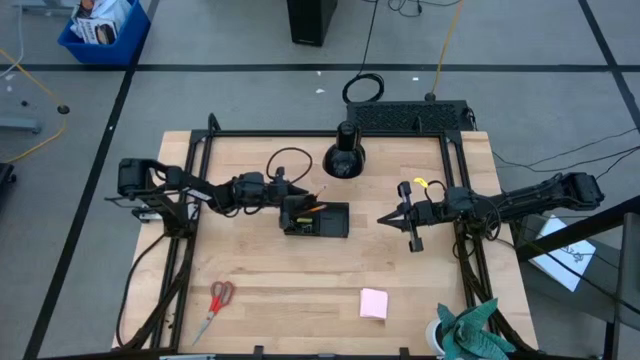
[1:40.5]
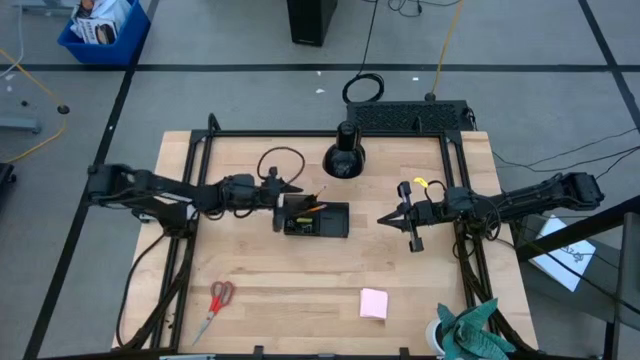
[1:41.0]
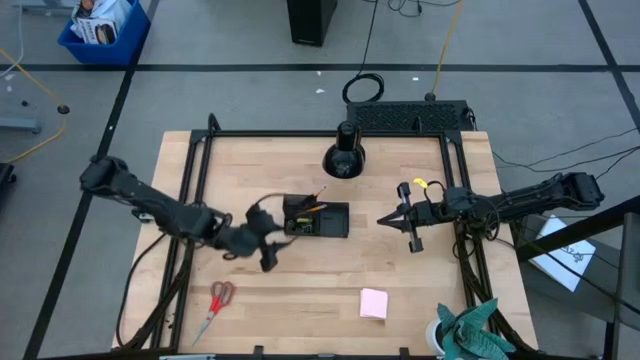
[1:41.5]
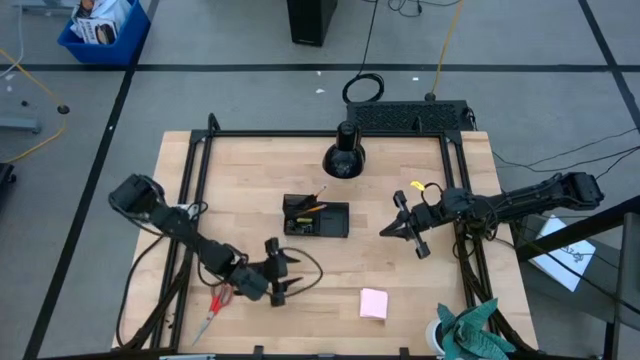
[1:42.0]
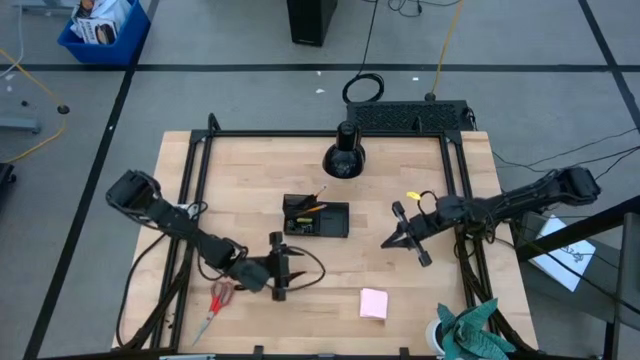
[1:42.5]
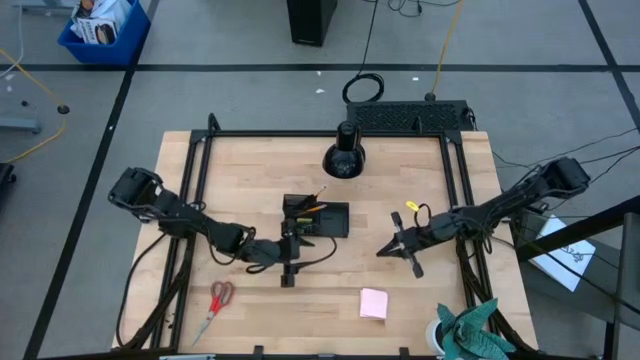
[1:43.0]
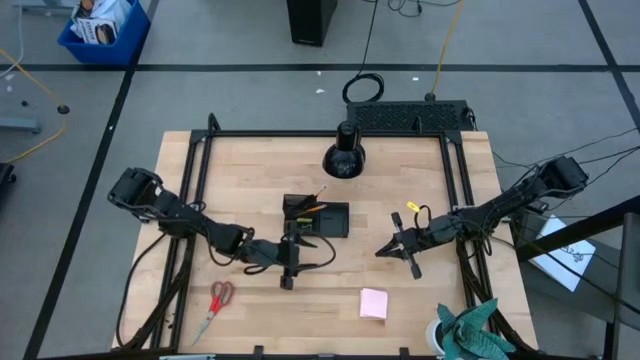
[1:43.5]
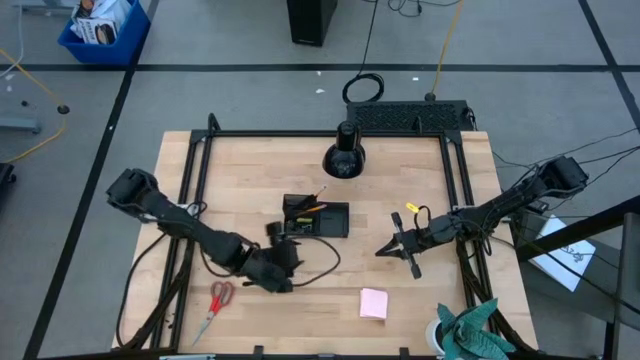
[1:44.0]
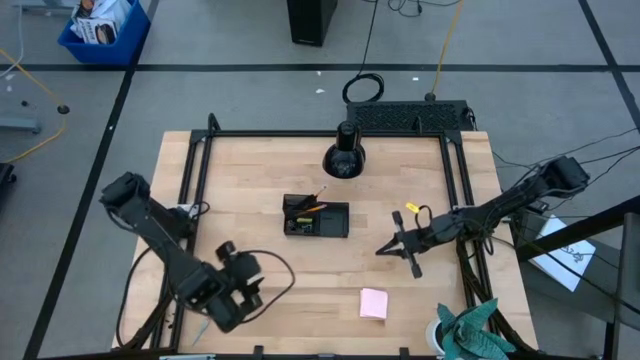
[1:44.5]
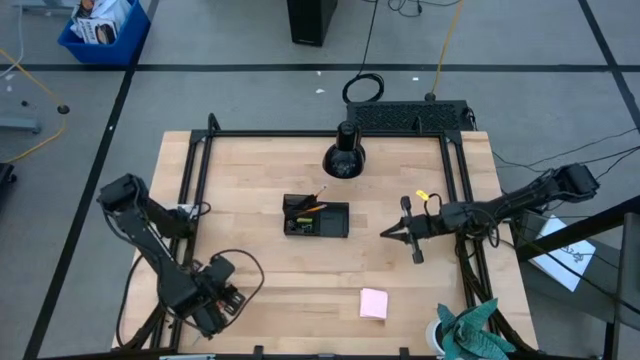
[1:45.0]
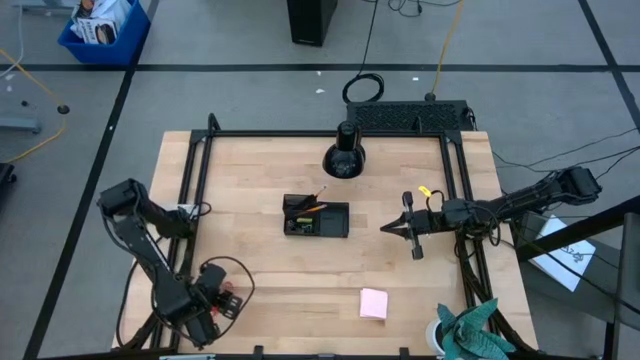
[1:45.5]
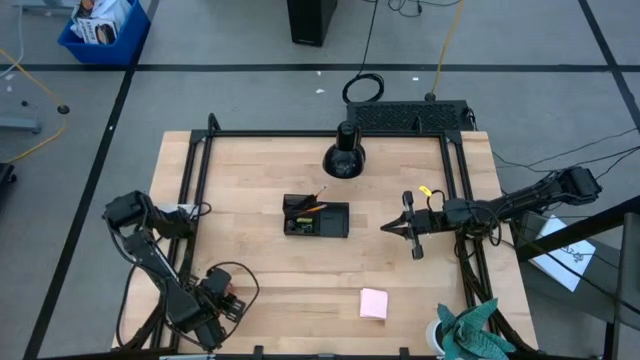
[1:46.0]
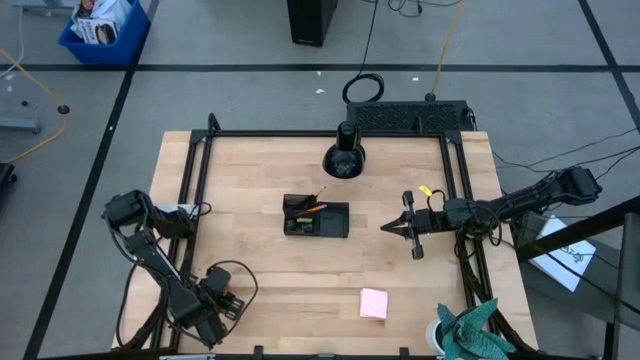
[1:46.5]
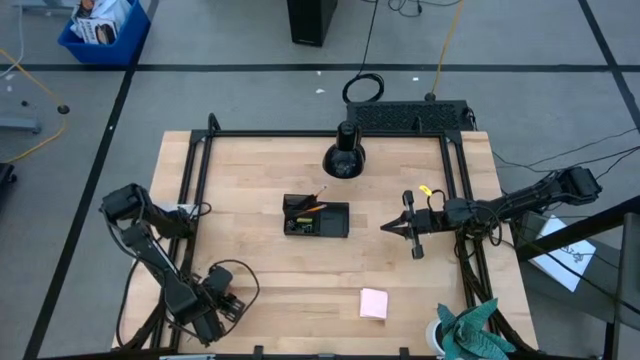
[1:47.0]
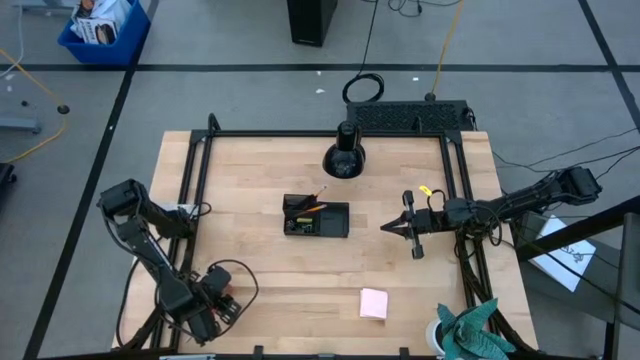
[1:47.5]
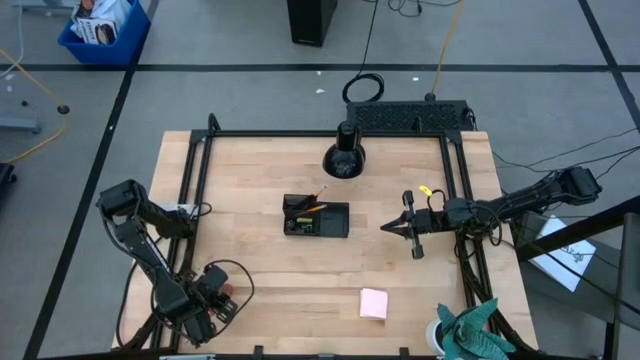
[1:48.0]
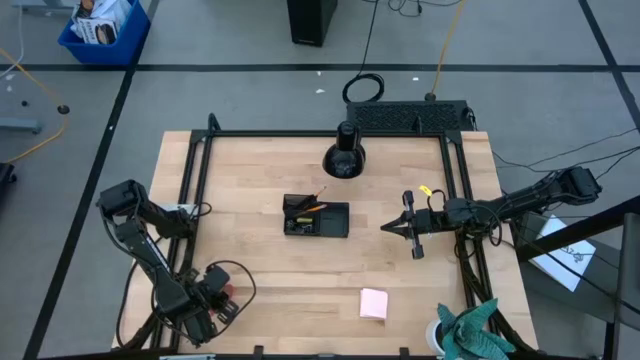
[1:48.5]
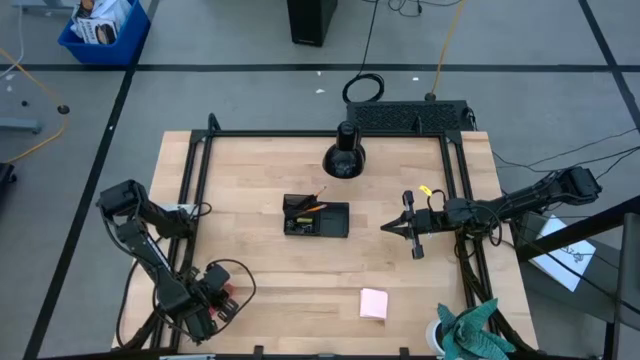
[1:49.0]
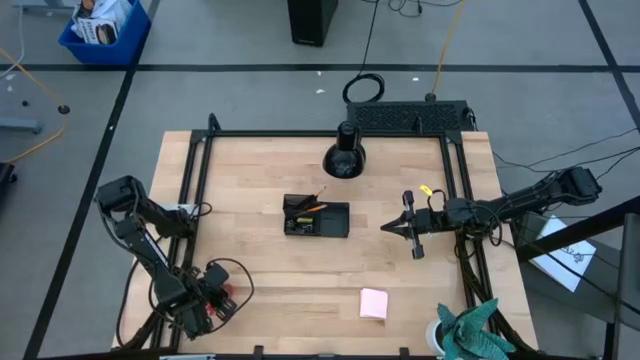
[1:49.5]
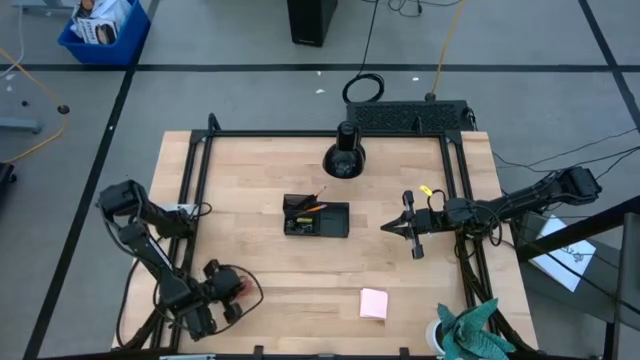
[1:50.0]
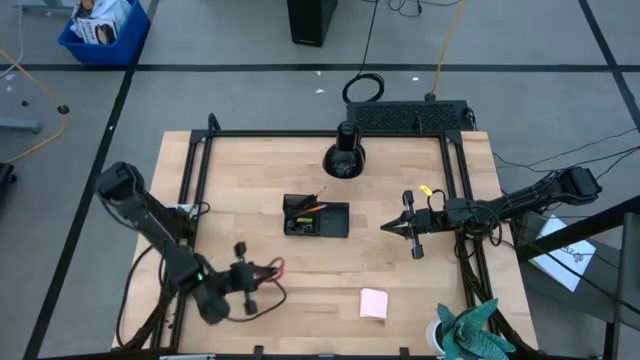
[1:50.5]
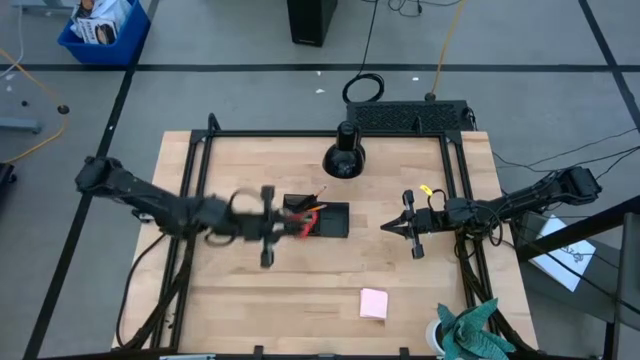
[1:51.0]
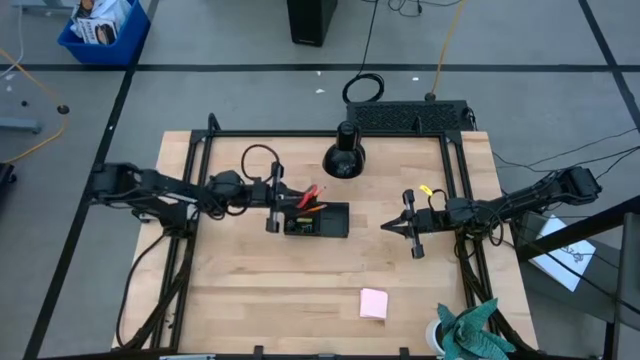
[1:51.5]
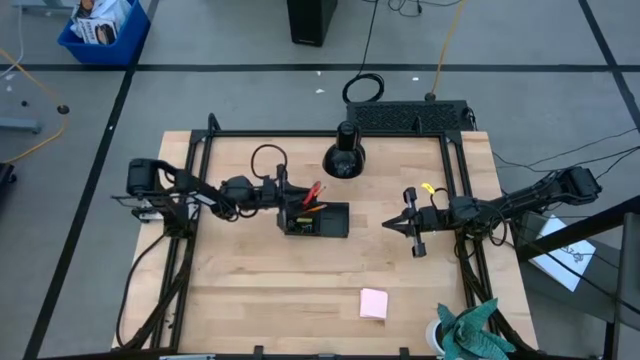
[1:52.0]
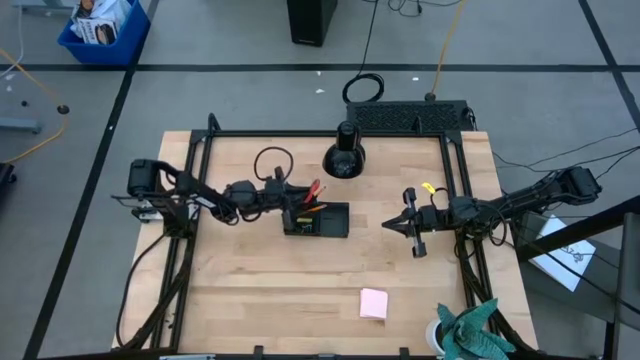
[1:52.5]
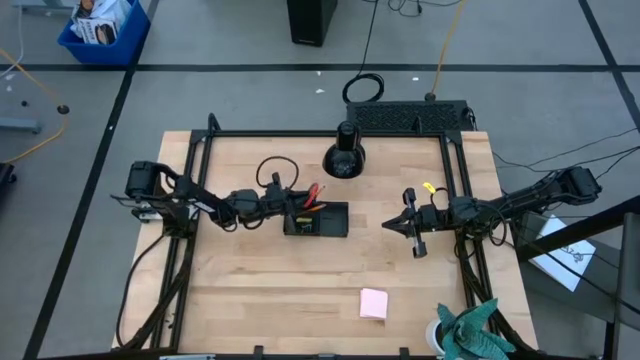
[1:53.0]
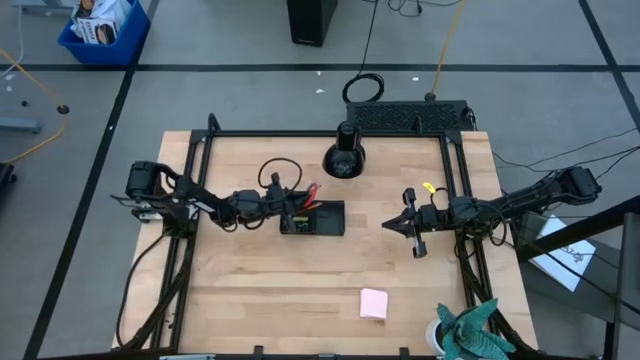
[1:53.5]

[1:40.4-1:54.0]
Task: Pick and place office supplies into organizer
Put the scissors into the desk organizer

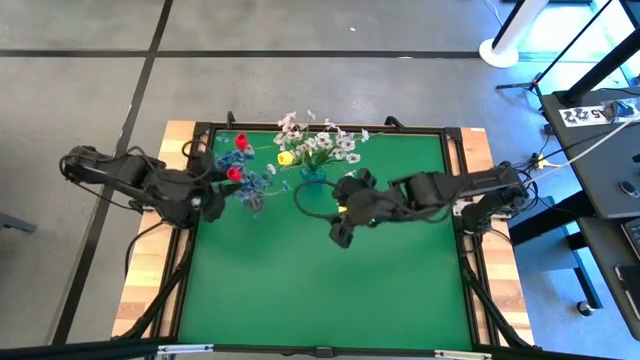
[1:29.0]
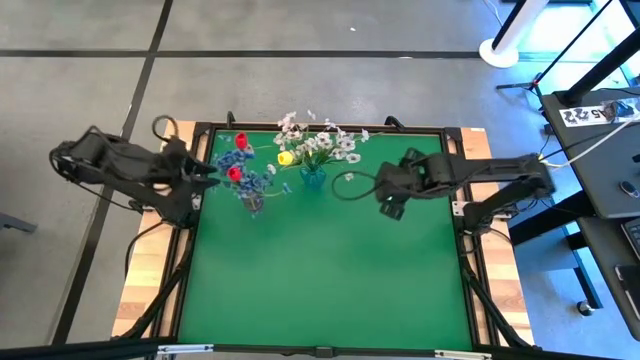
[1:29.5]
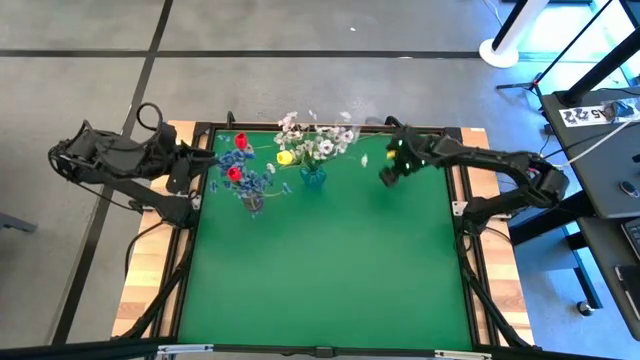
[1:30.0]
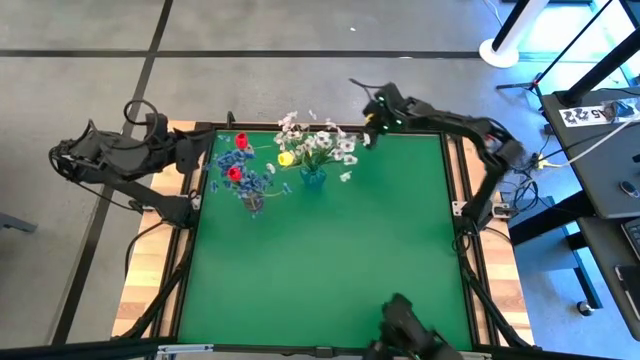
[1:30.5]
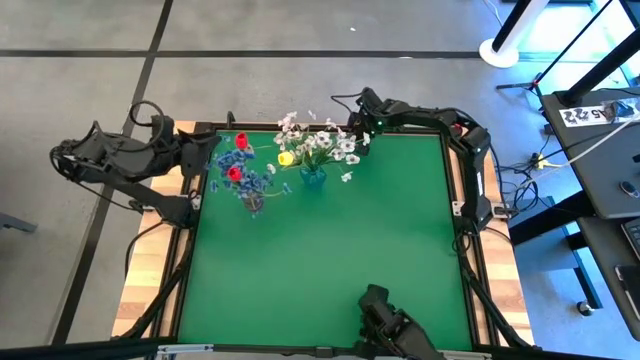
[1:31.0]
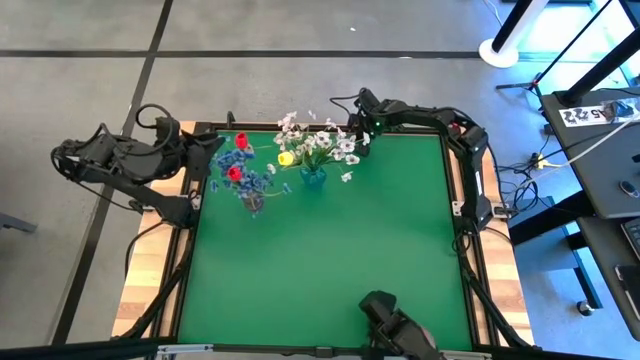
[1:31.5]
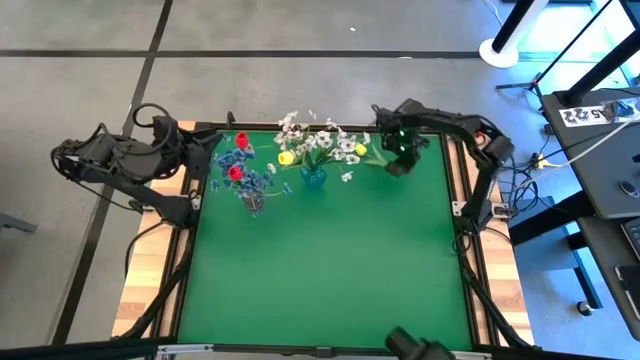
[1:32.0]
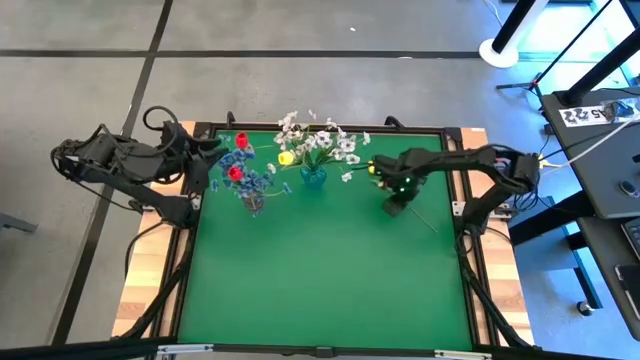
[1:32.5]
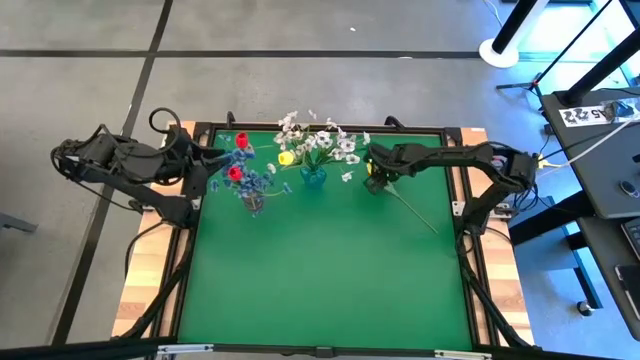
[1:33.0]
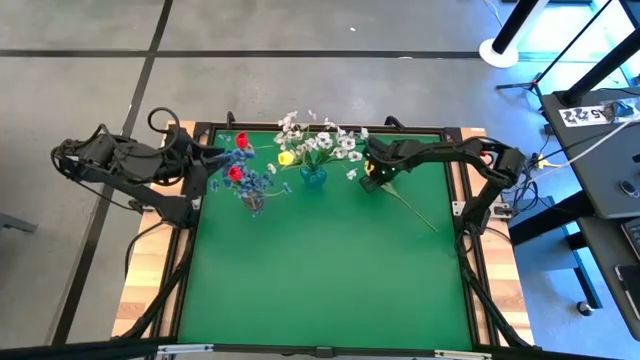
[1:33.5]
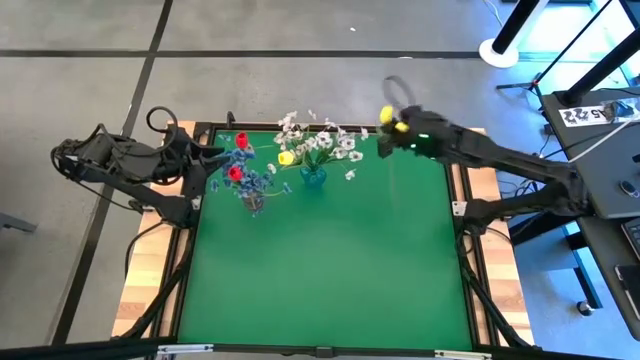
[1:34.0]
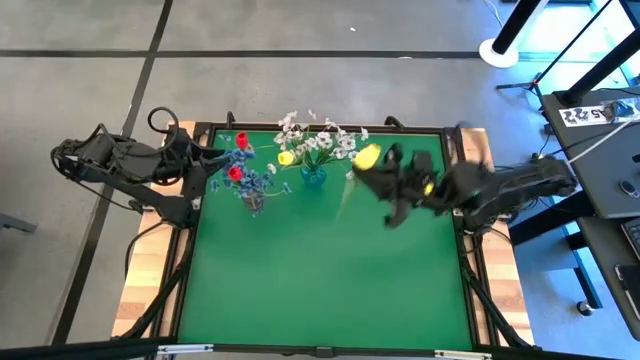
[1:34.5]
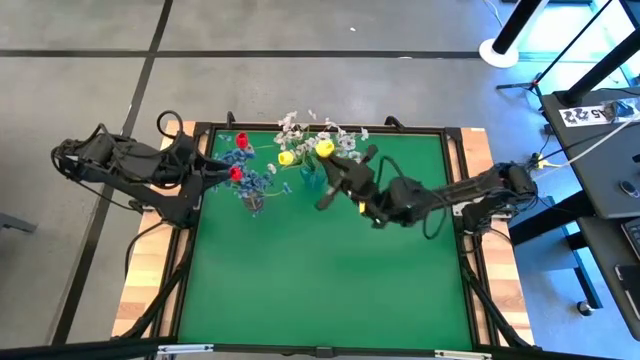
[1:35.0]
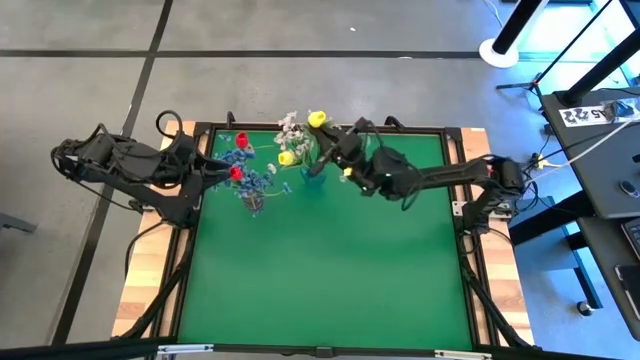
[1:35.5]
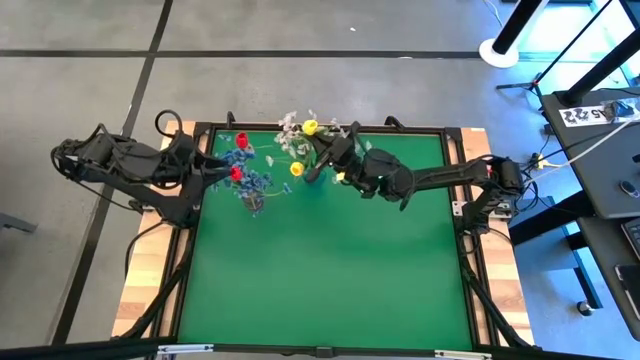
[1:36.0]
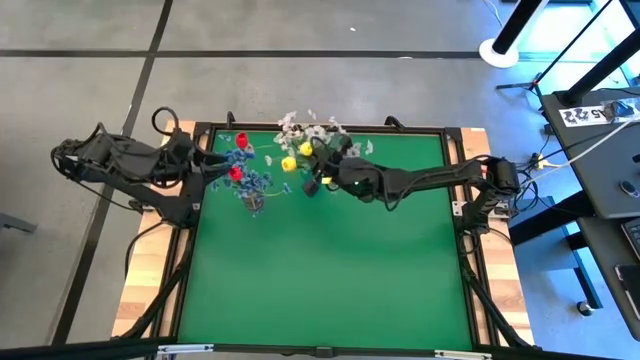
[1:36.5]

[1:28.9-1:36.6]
Task: Sort flowers into vase by color
Put the yellow flowers into the violet vase
